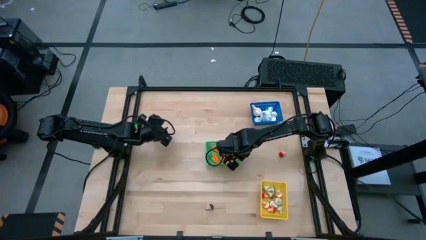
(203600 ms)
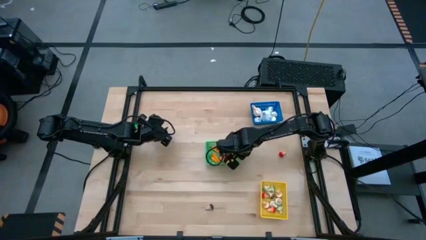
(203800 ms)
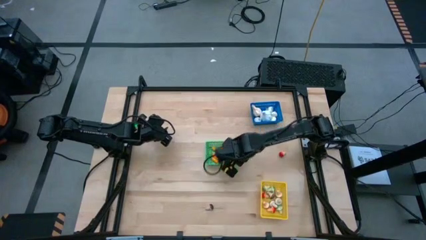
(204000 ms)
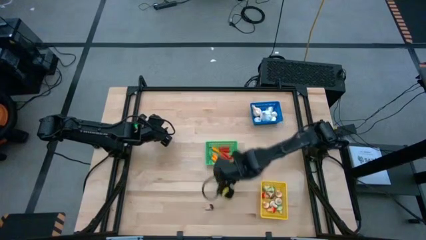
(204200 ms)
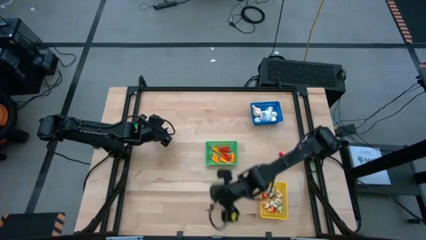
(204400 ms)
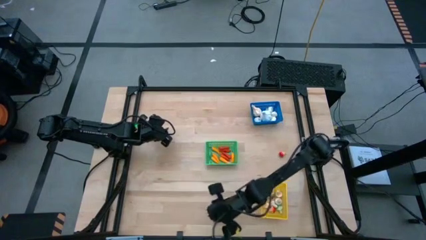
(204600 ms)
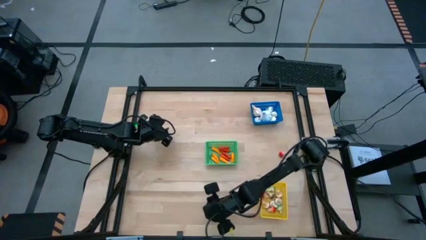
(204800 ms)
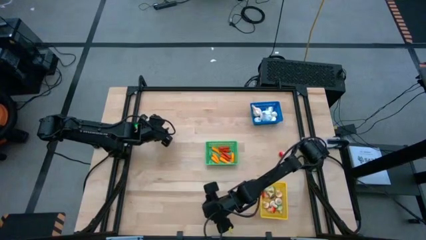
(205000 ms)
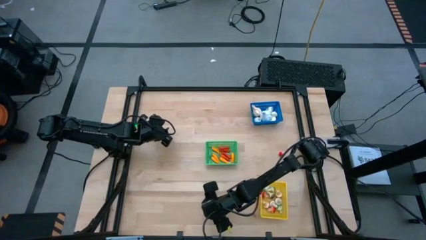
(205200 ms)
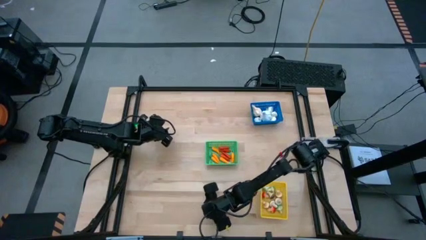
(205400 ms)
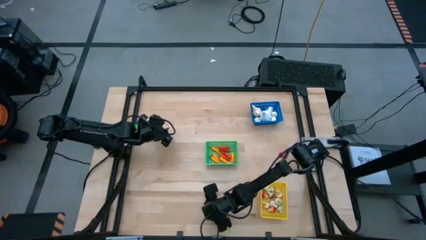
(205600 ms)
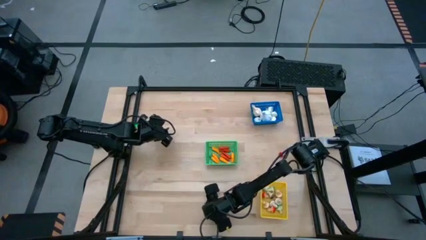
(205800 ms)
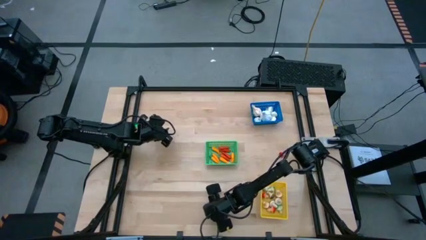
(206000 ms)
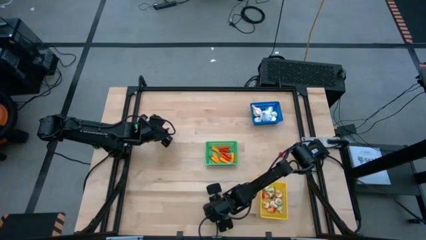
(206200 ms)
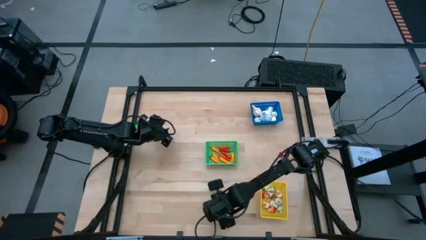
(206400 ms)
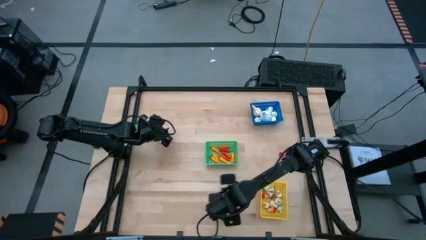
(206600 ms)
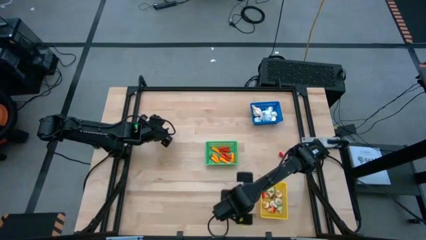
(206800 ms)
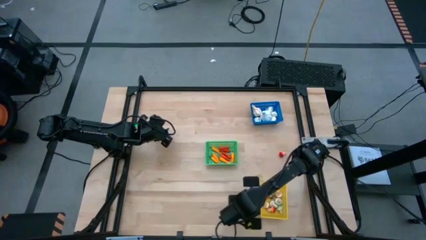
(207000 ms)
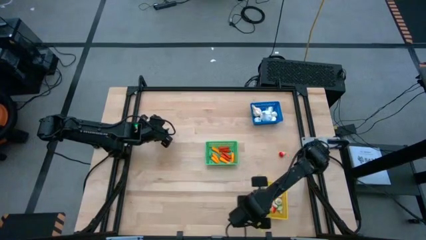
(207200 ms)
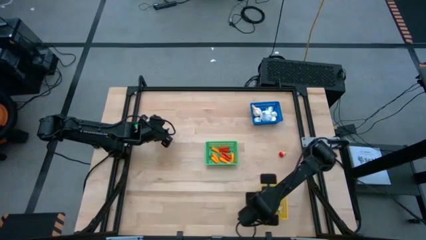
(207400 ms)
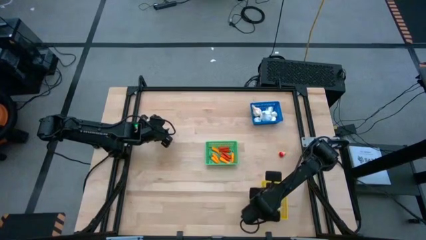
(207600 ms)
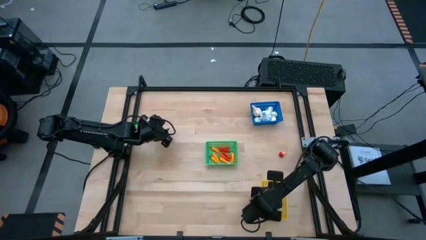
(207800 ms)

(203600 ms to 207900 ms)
Task: Sort produce into baskets
Put the brown mushroom into the yellow bin

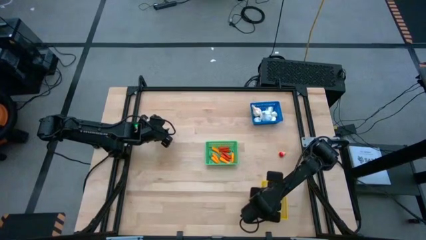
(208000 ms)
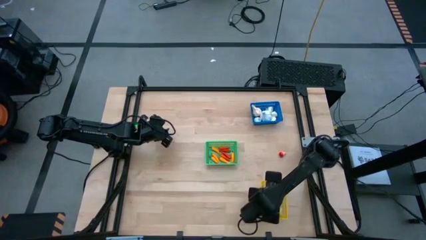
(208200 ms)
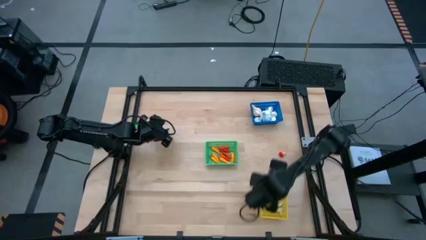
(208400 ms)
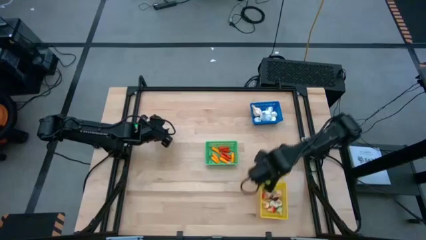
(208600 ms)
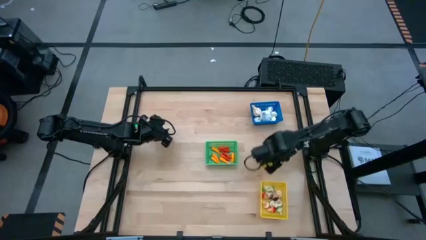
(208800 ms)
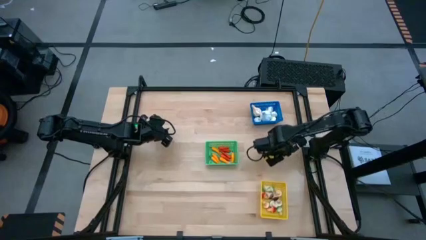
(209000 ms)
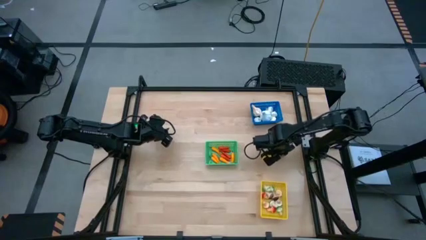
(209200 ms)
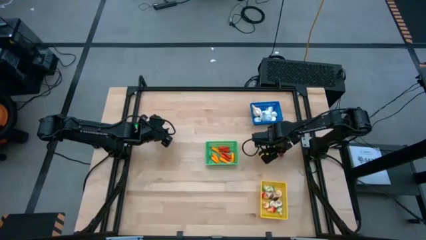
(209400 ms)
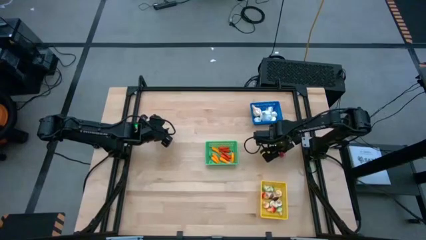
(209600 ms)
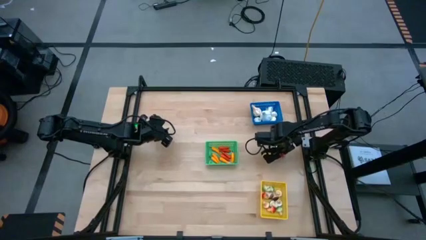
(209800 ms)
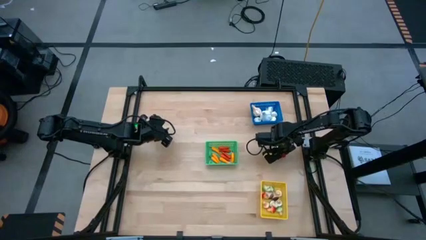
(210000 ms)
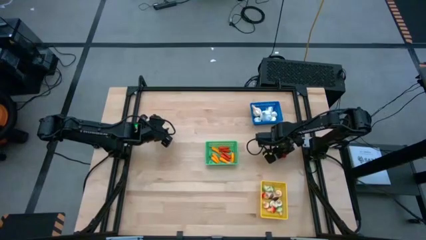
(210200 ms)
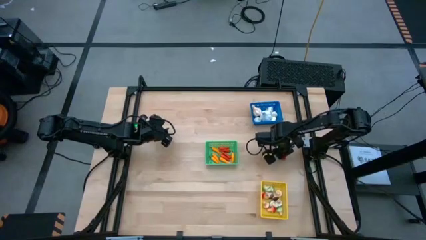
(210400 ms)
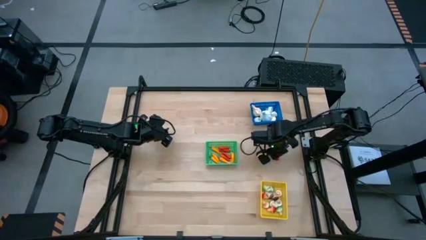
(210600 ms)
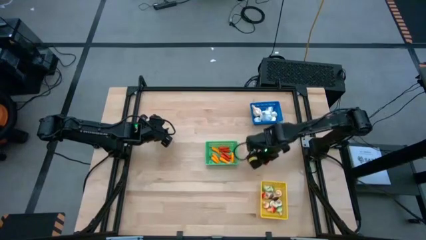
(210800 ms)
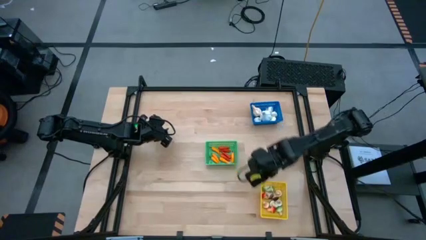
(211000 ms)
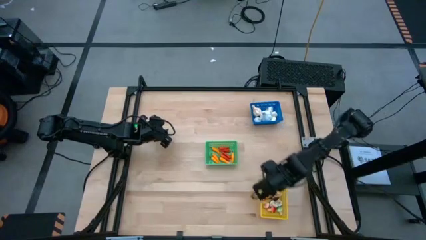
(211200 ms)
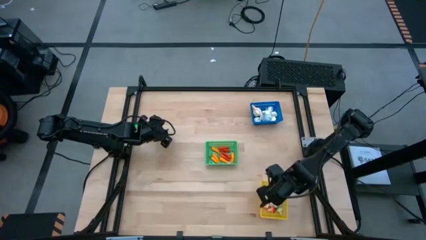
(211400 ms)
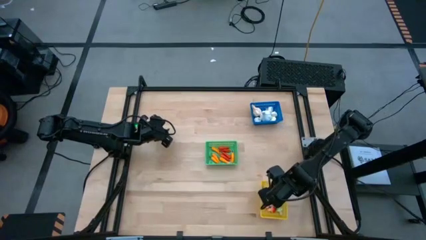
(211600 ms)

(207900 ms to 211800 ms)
Put the orange mushroom into the yellow bin

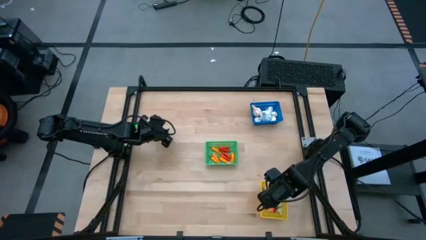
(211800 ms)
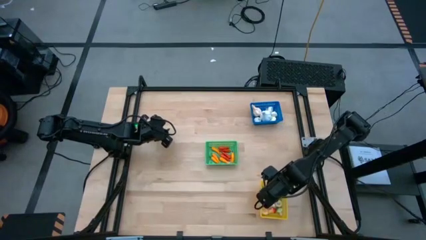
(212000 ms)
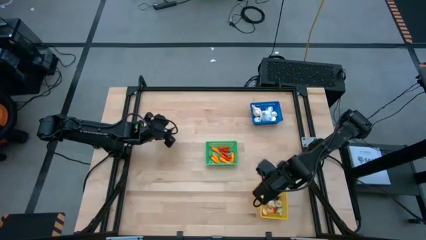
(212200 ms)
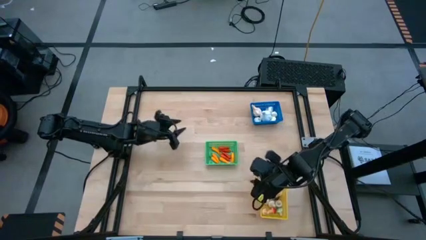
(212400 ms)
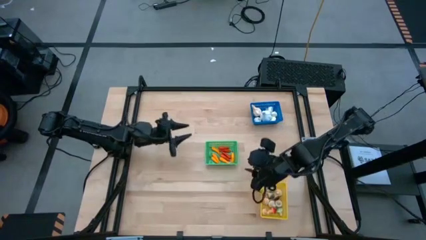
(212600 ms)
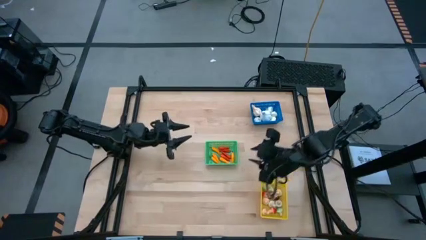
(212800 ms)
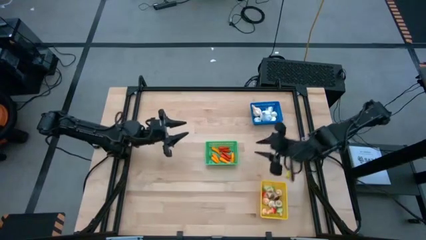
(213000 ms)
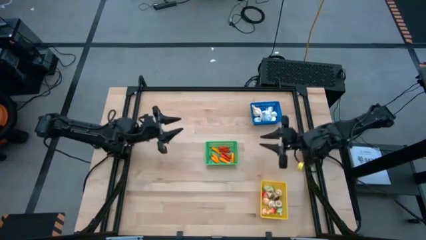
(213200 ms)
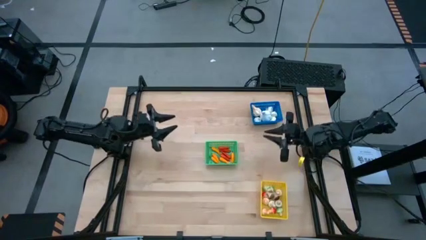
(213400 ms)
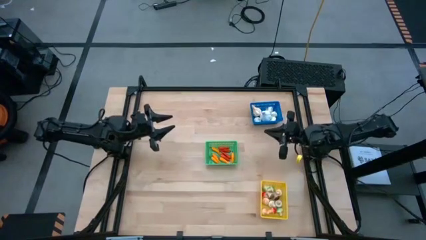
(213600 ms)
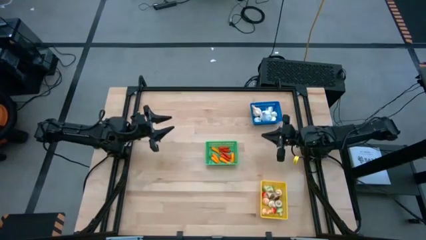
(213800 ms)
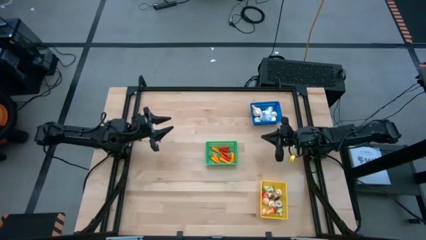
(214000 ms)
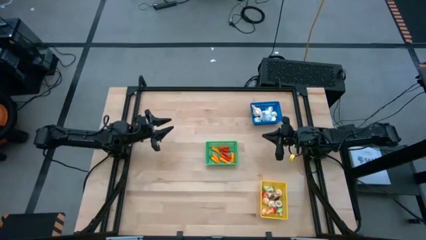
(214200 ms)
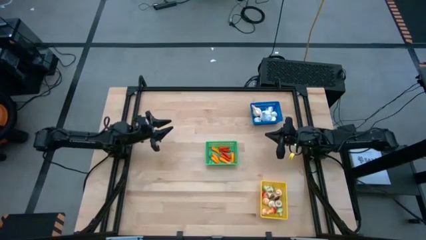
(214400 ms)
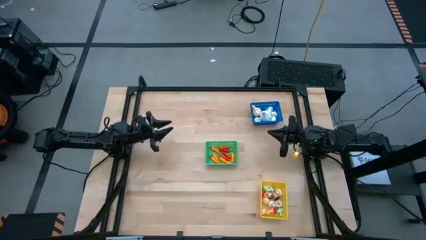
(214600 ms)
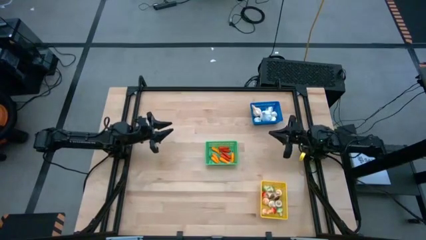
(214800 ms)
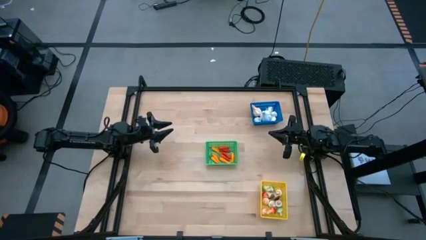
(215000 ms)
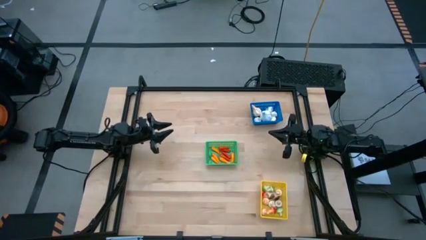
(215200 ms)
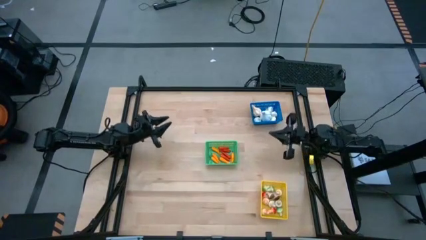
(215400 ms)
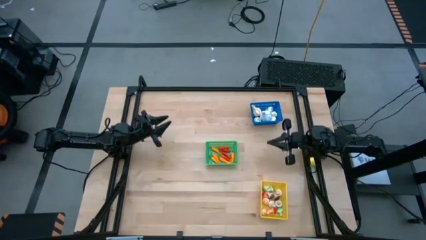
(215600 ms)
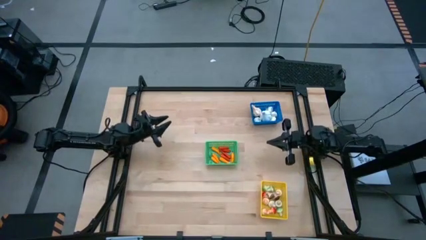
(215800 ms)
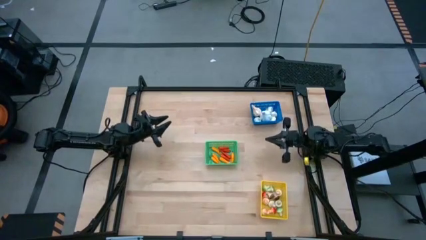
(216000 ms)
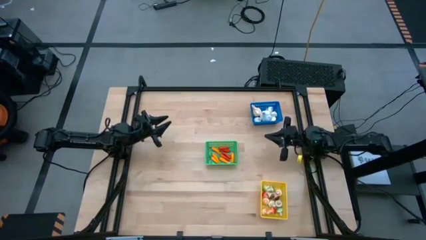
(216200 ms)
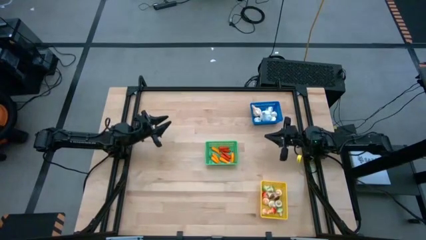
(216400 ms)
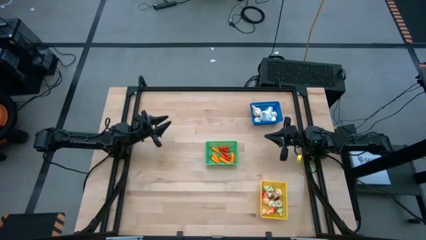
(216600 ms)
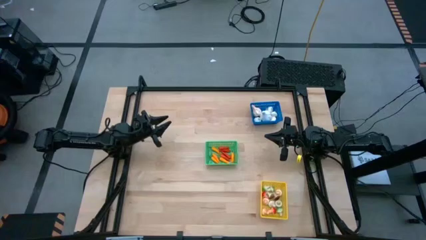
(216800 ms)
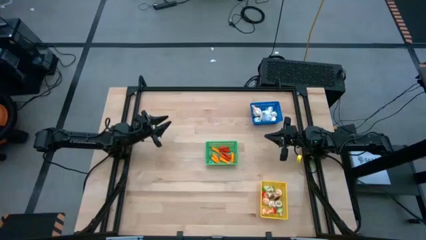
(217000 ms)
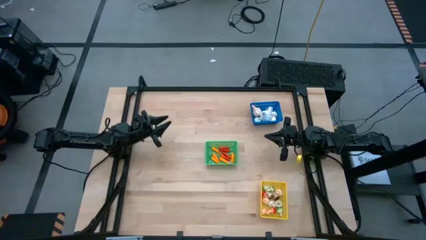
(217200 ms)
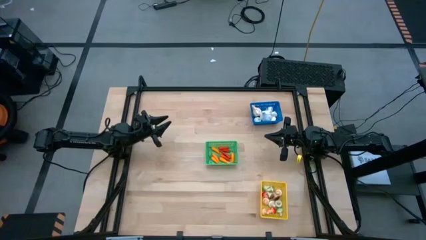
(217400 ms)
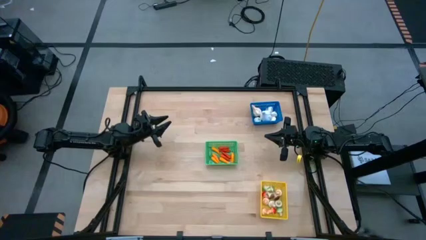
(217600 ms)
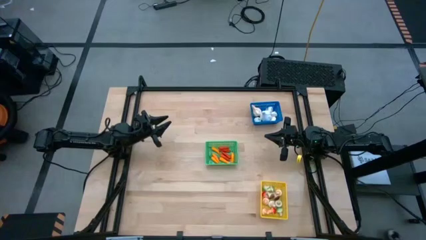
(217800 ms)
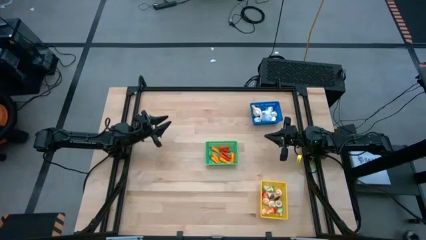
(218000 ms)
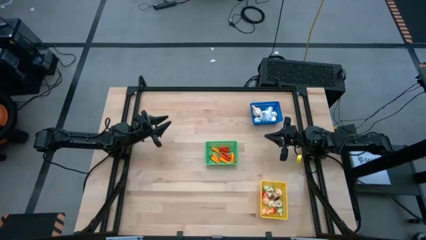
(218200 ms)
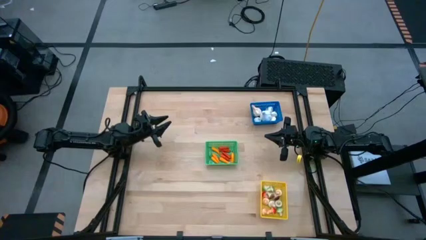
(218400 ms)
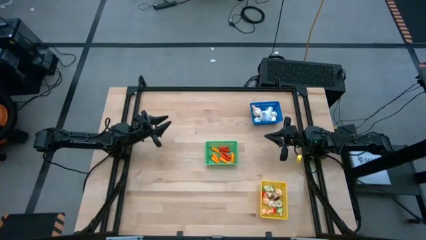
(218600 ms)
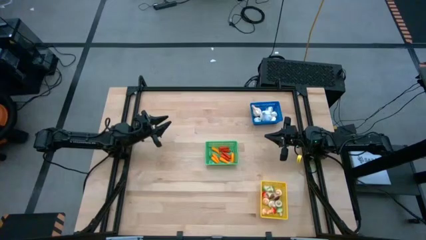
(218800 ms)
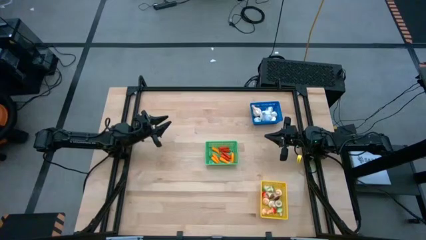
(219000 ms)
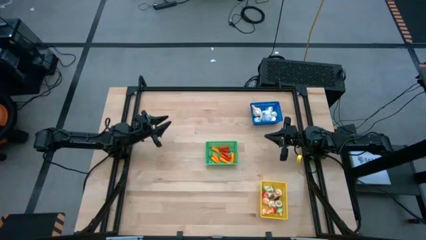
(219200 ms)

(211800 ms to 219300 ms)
Return to Home Position
